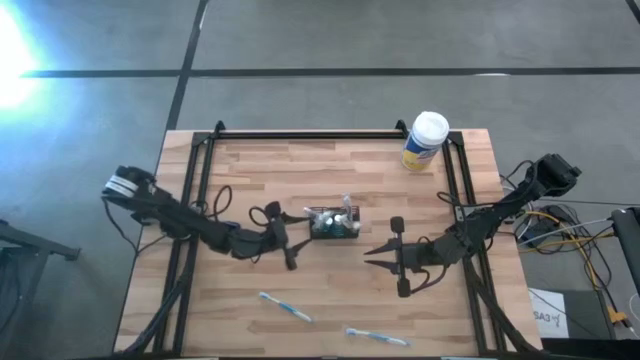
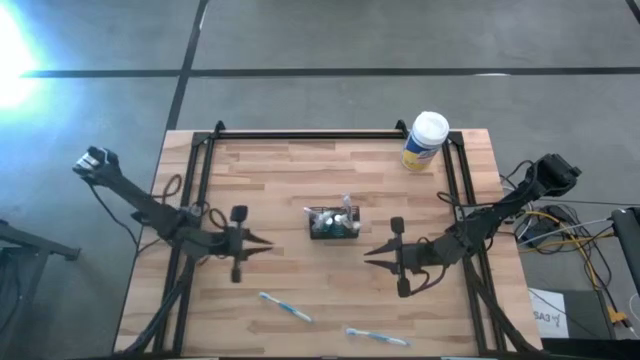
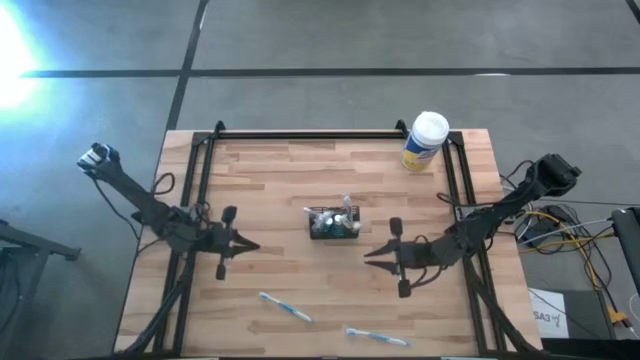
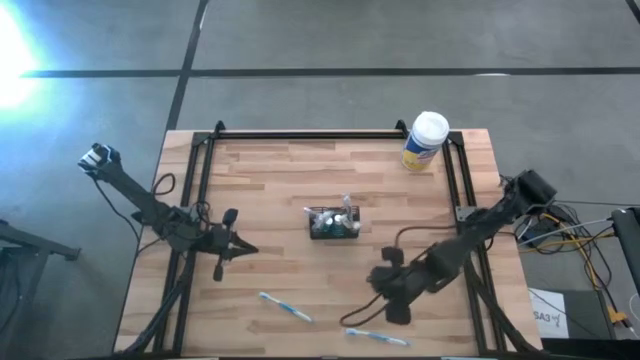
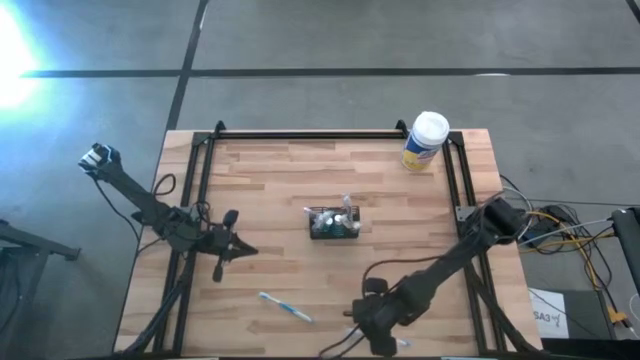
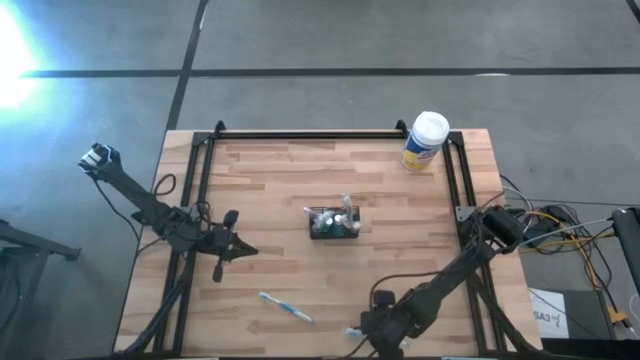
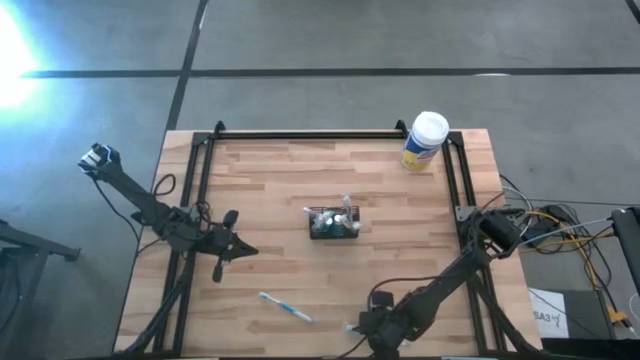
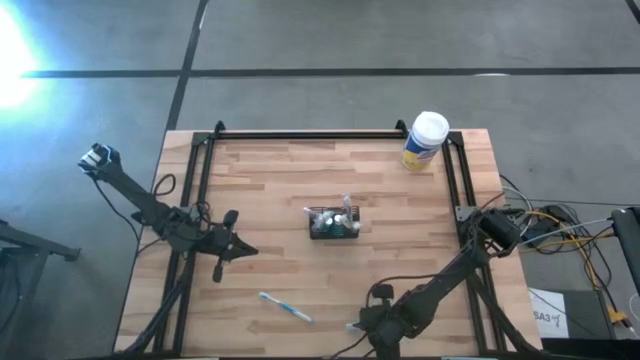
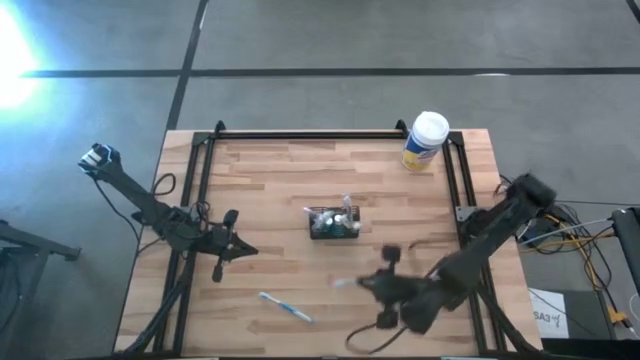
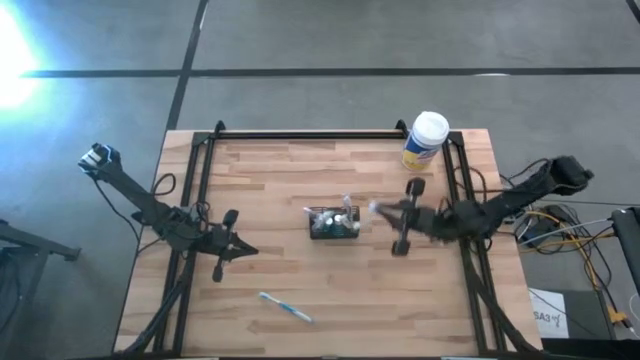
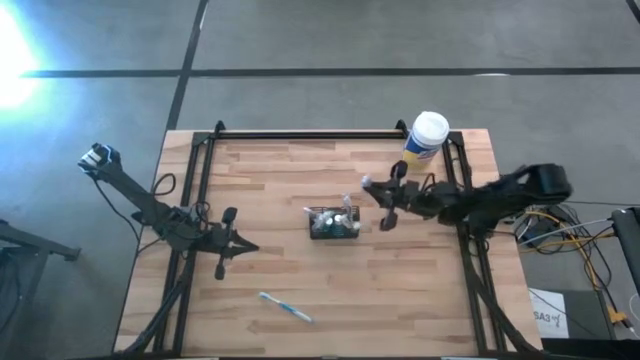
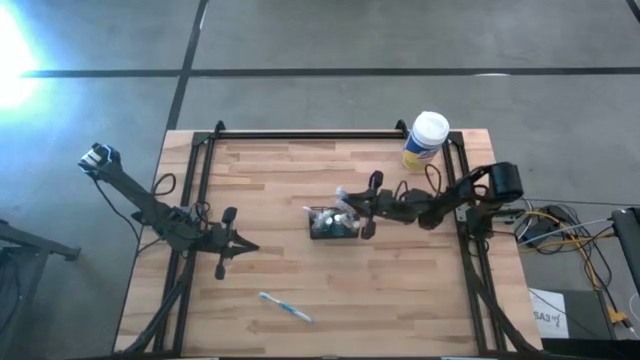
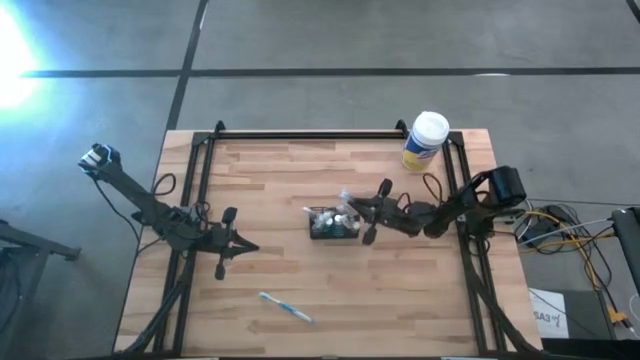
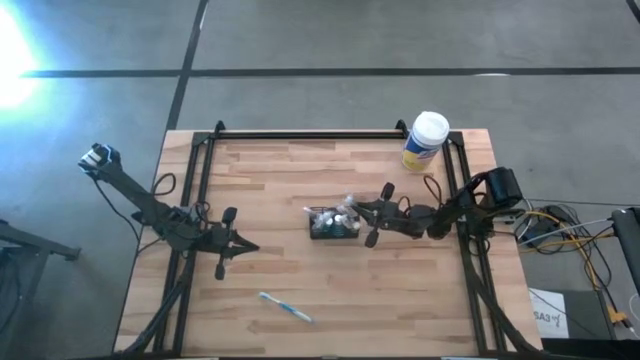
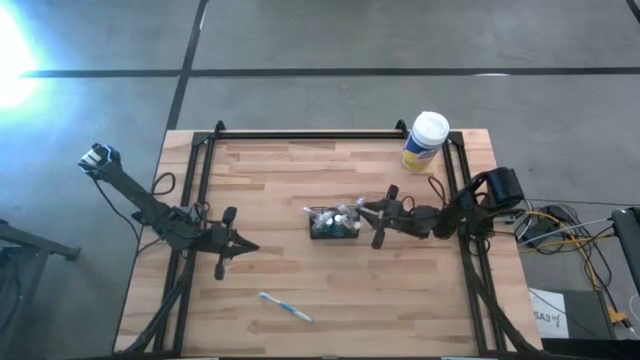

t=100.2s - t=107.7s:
Task: Pick & Place toothbrushing station
Put the right blue toothbrush into the black organizer

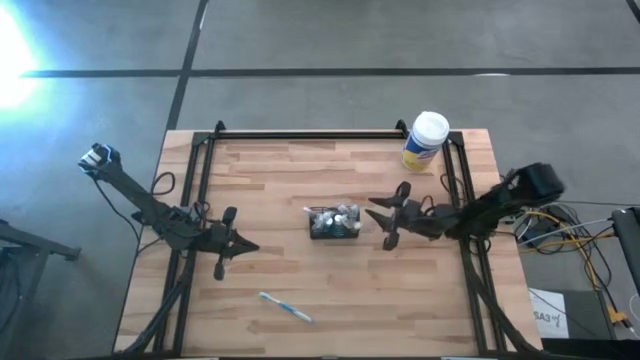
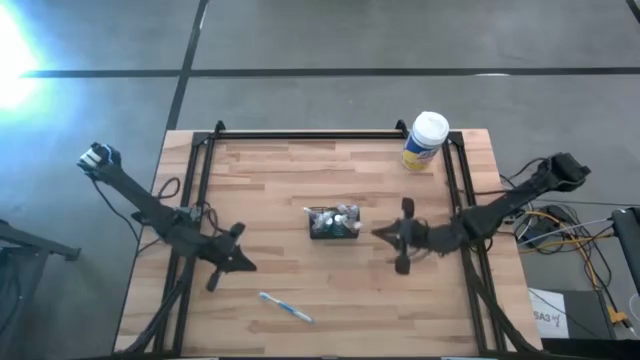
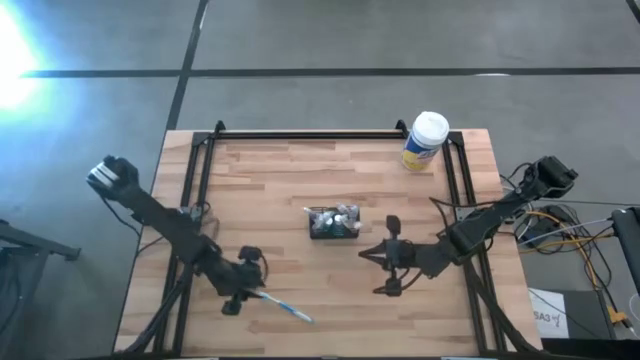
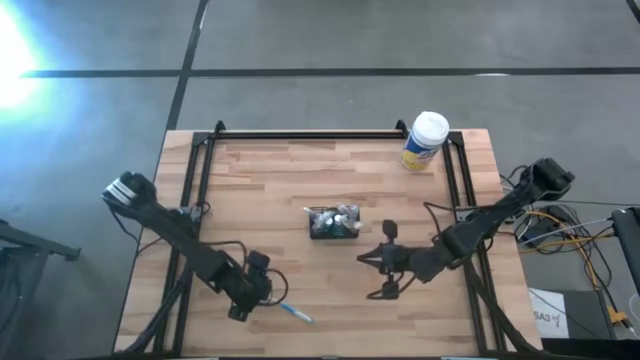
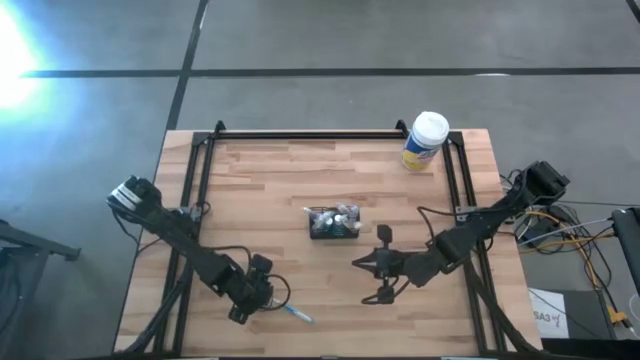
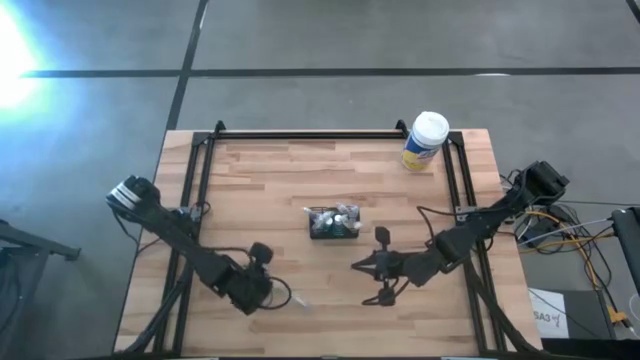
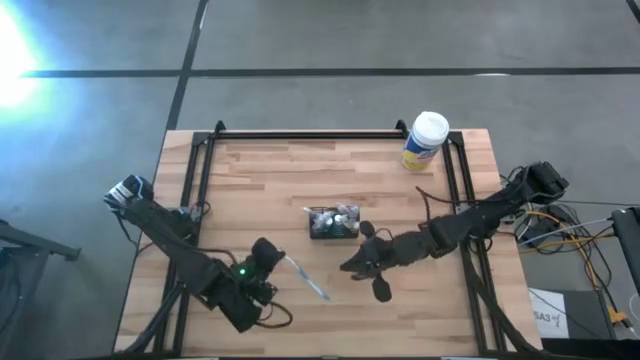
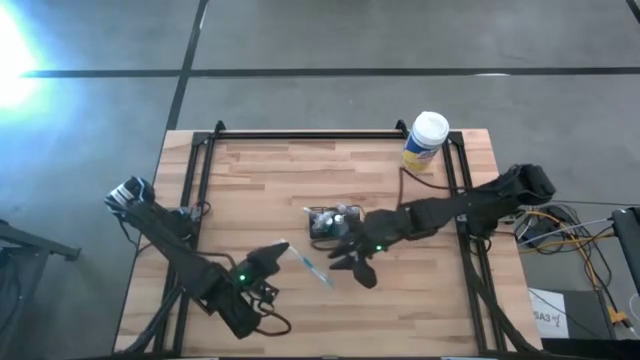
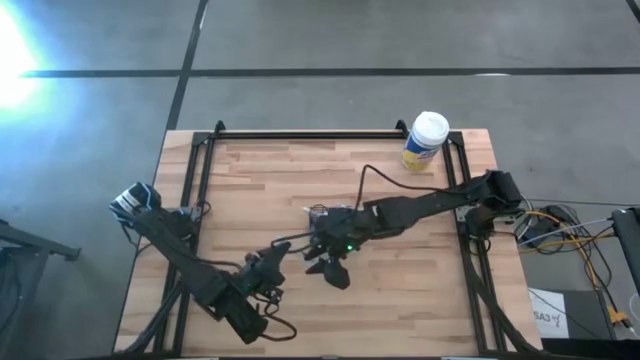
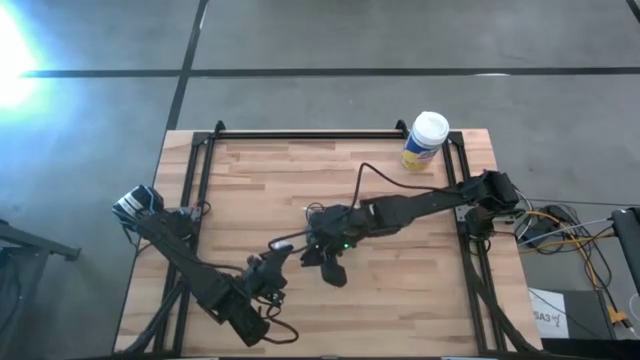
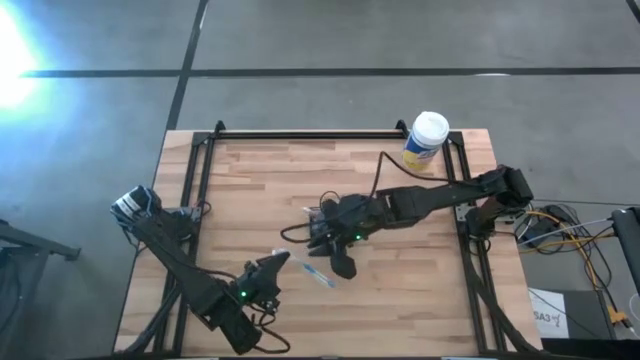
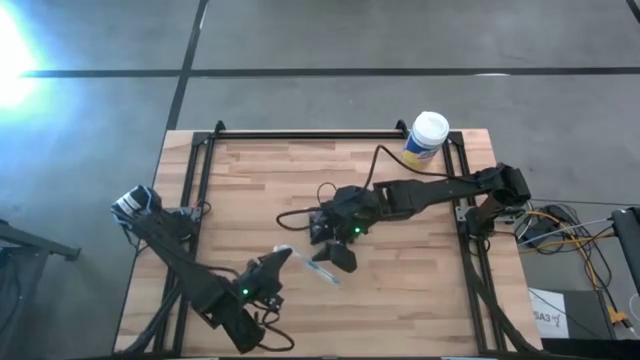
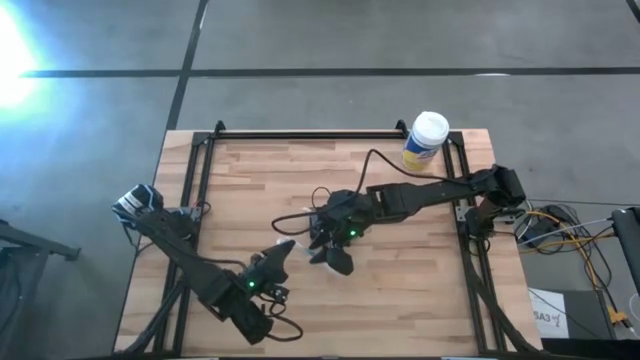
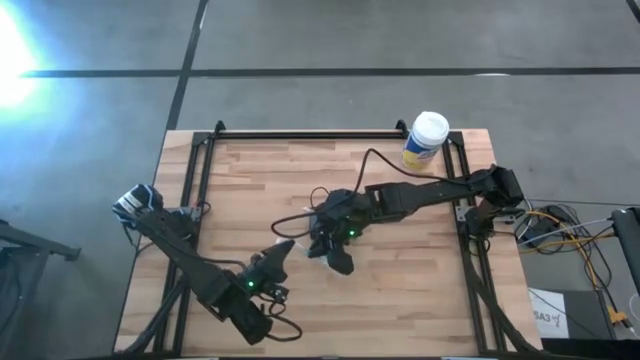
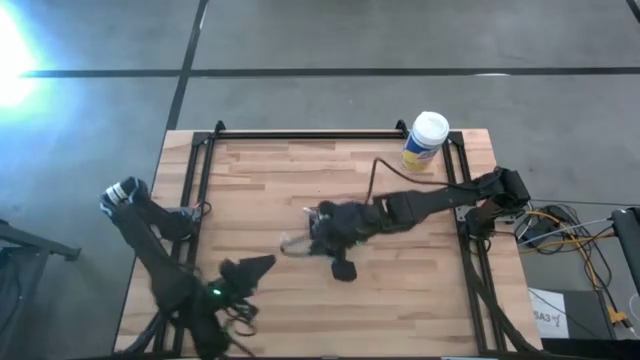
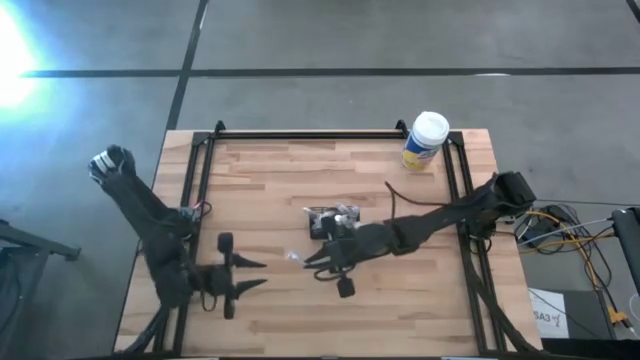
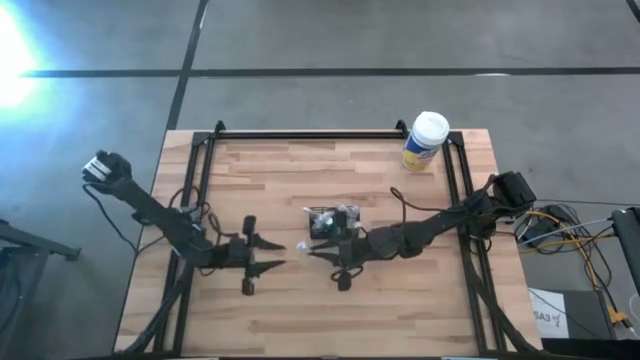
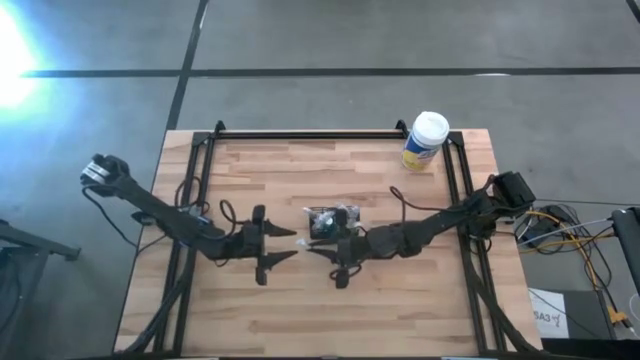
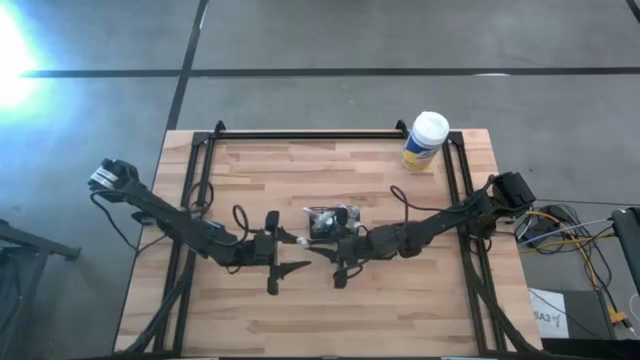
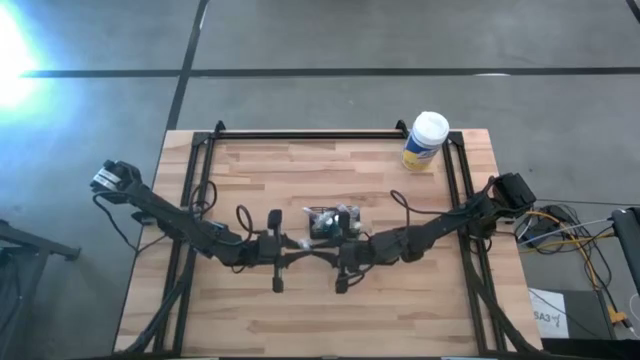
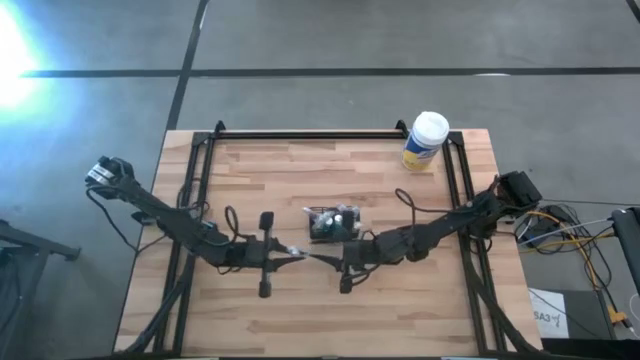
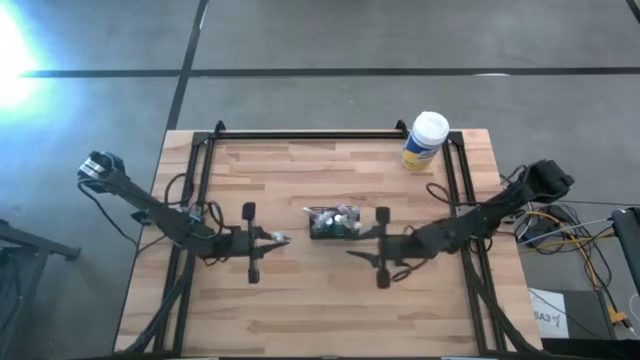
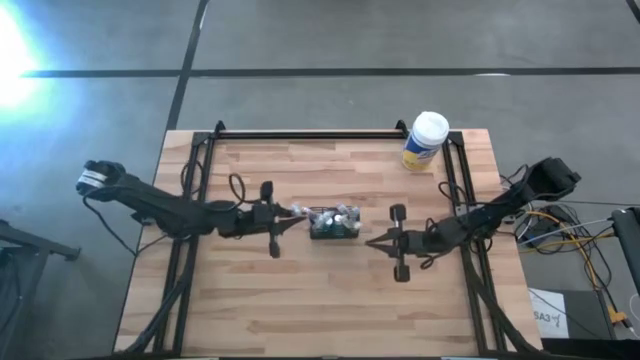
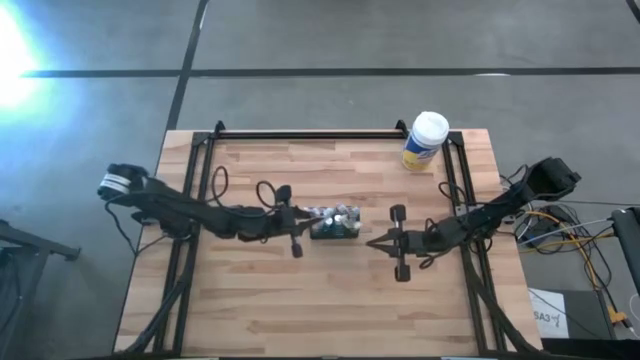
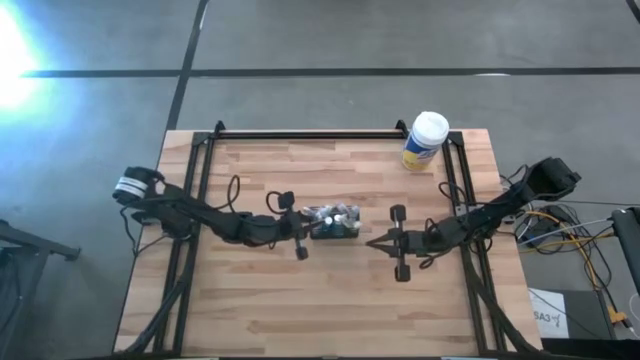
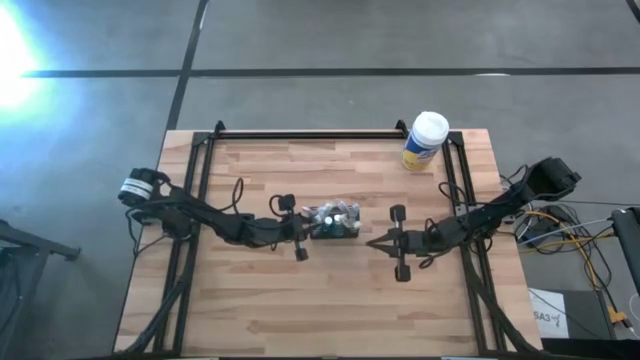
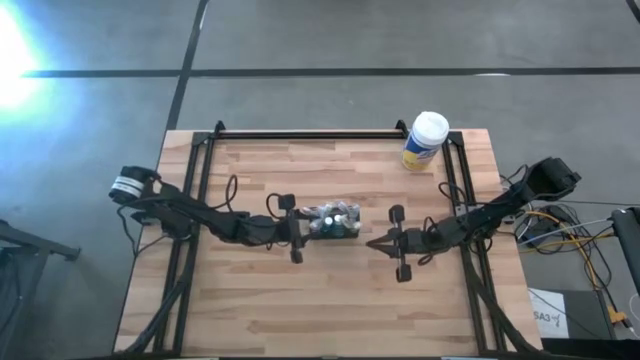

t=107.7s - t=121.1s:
Put the blue toothbrush into the black organizer
